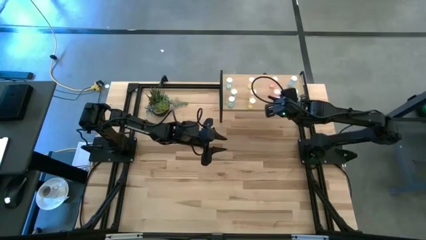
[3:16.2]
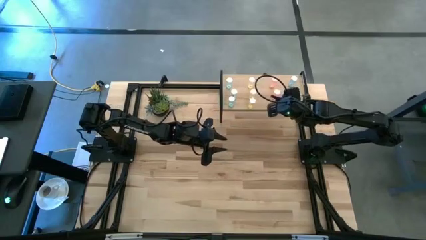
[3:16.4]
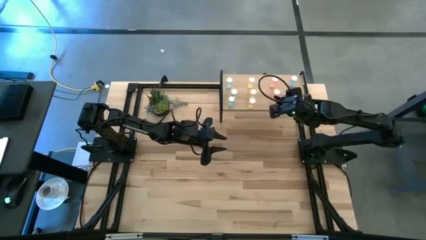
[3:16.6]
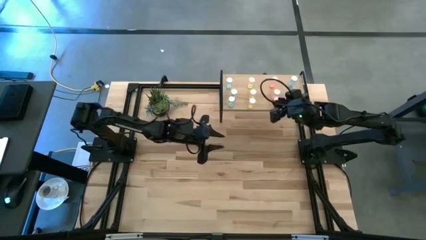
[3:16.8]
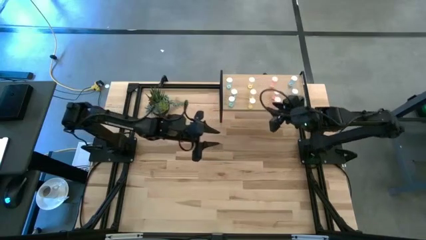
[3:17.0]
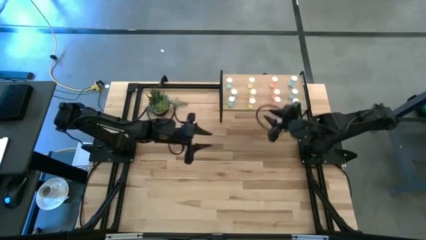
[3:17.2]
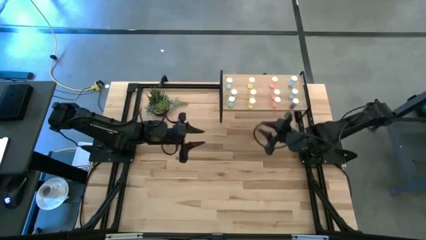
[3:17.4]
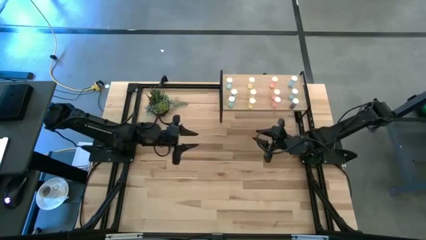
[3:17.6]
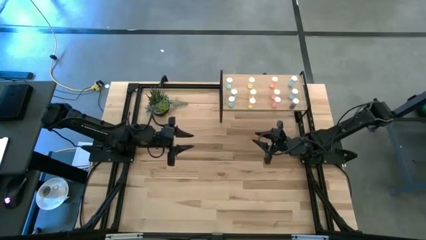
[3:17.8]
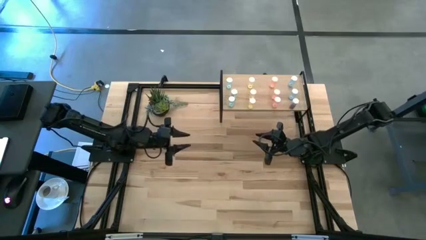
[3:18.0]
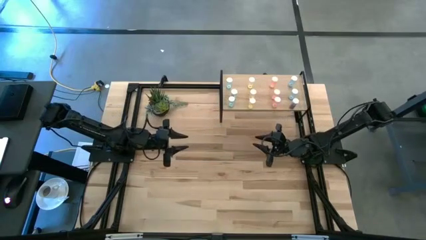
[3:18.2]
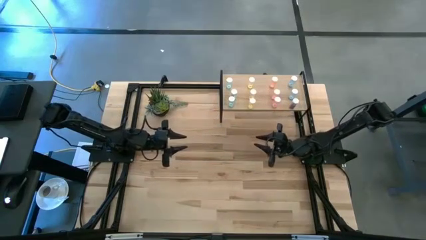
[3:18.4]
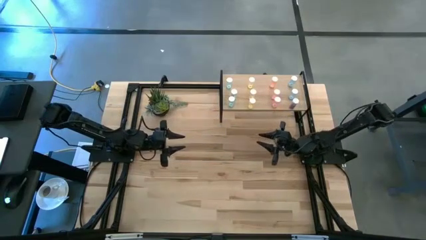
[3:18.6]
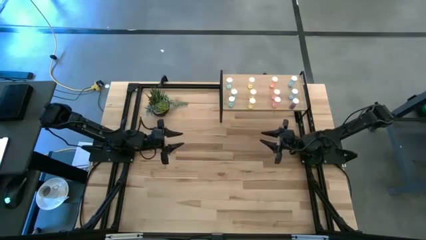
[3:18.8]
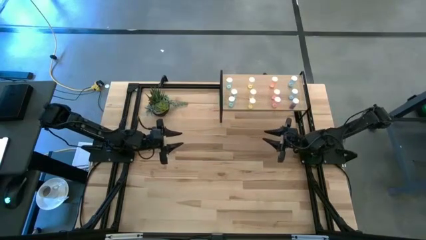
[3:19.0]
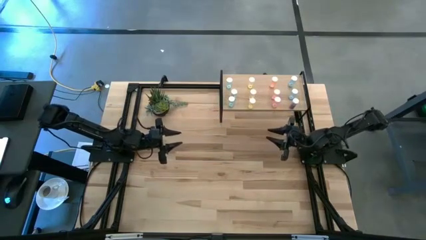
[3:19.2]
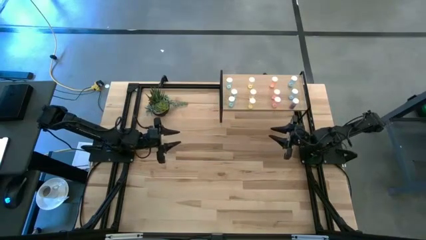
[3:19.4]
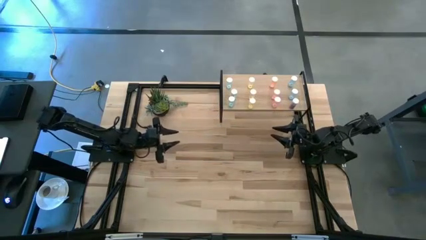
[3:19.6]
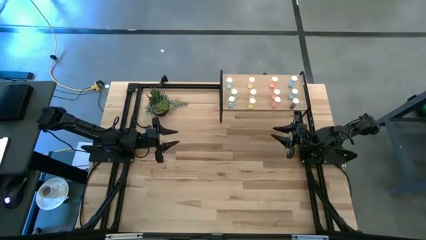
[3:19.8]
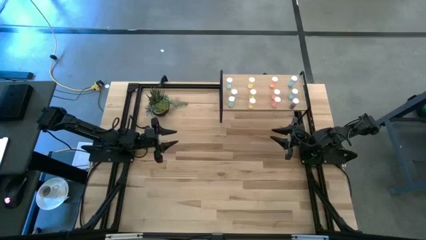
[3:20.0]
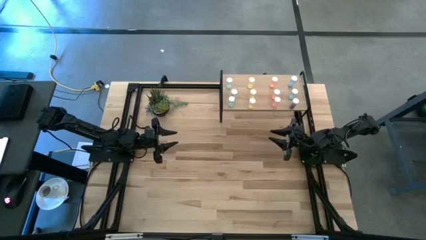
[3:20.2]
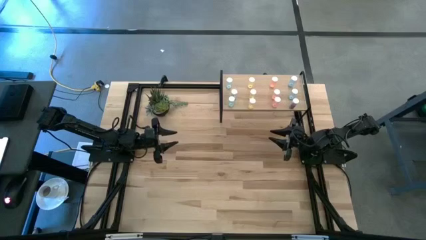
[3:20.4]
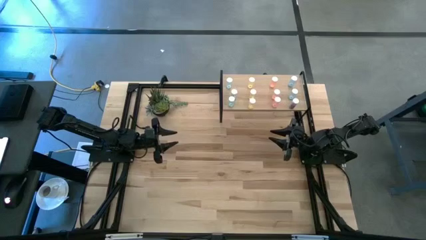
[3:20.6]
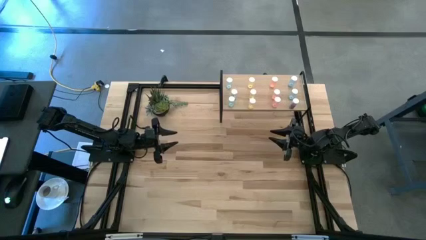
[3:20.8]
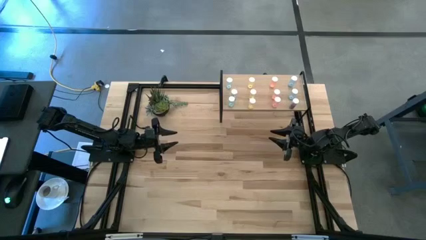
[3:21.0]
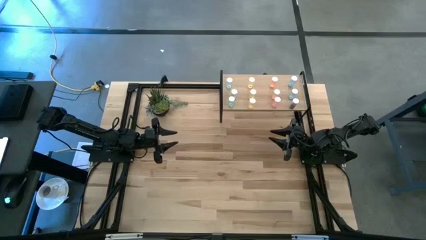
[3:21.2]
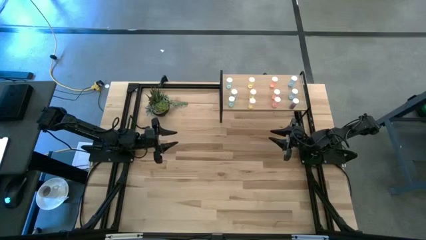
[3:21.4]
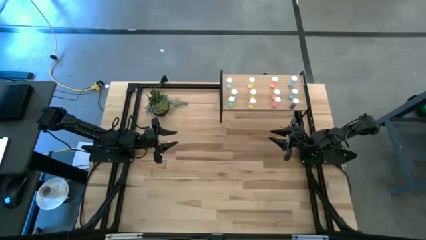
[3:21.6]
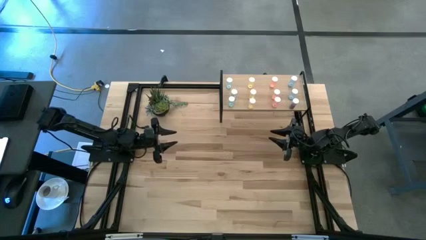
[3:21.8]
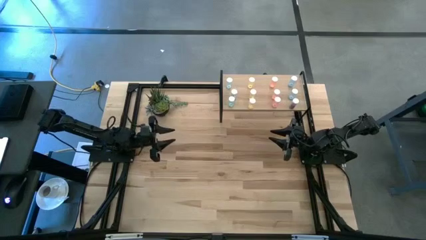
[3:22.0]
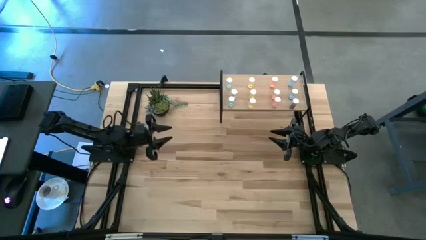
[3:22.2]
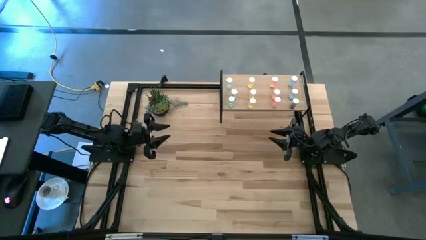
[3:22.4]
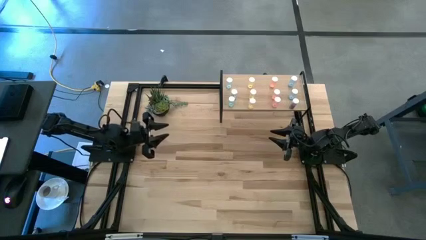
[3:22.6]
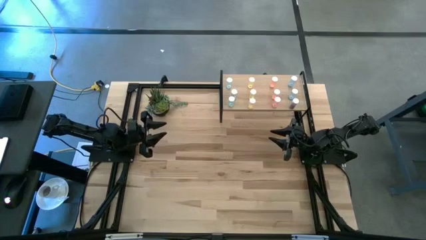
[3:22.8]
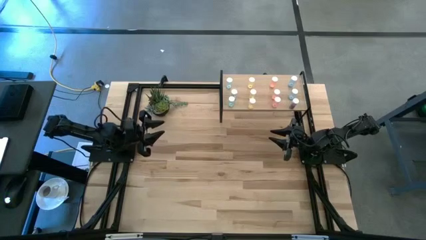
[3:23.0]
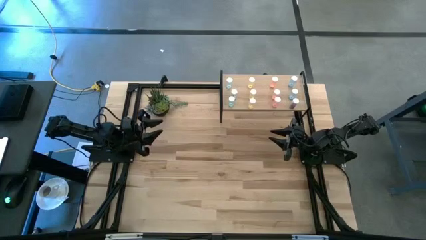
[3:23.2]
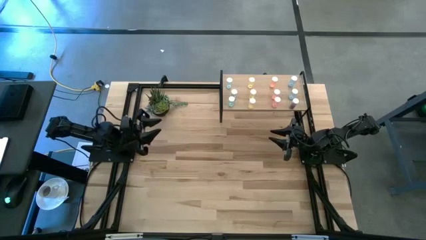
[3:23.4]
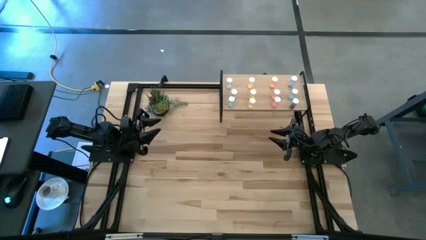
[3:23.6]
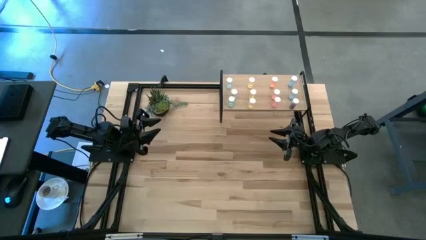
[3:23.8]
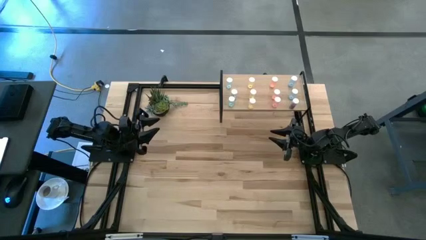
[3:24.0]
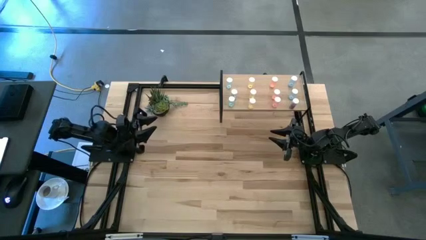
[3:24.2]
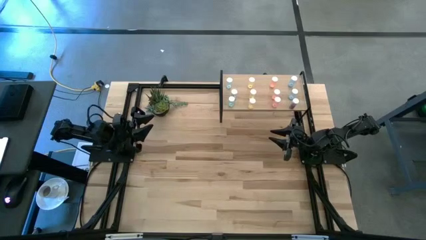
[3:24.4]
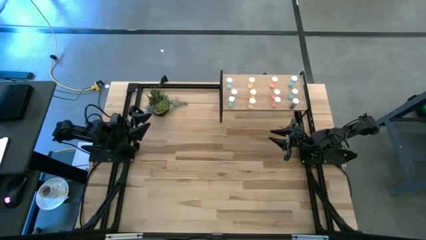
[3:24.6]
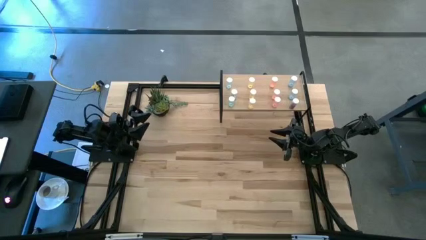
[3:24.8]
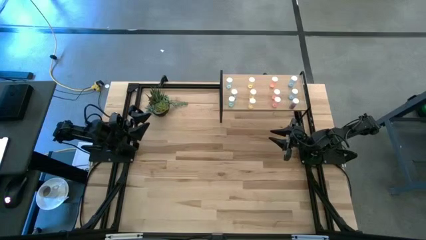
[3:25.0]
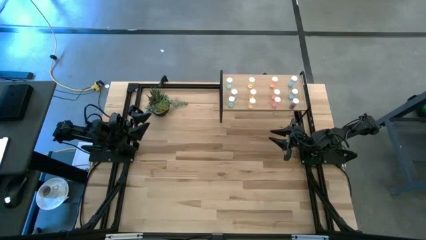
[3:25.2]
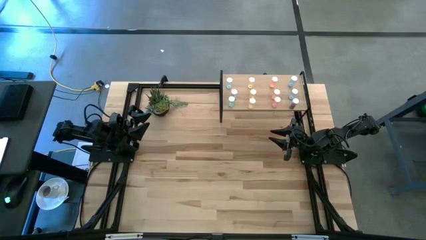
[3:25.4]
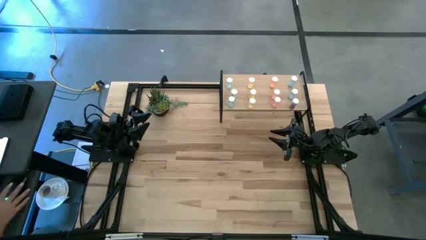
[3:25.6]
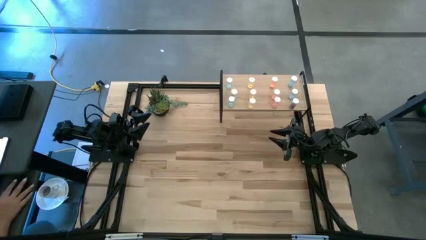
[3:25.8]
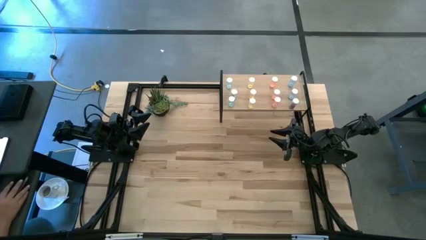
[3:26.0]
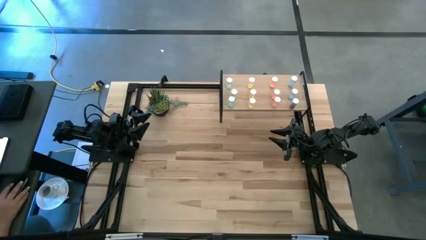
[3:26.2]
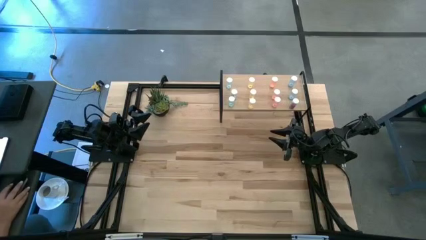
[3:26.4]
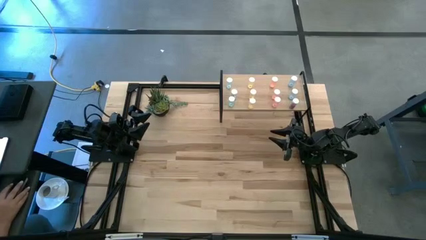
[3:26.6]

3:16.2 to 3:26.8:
Task: Pick and place medicine bottles onto shelf by color
Return to Home Position
